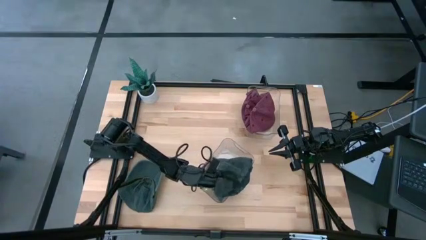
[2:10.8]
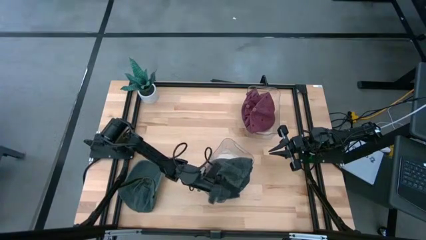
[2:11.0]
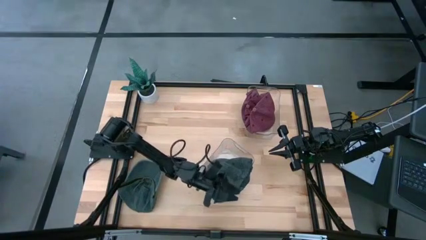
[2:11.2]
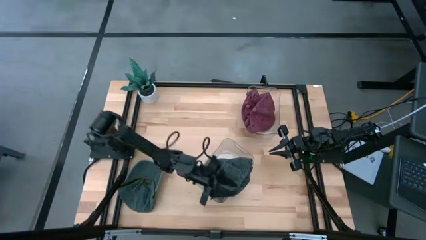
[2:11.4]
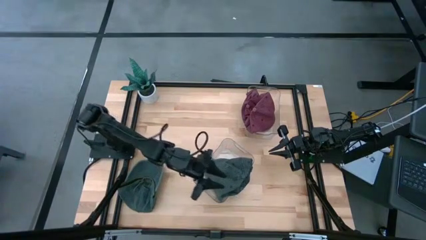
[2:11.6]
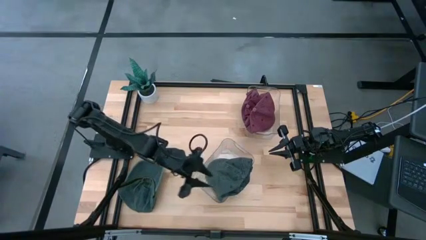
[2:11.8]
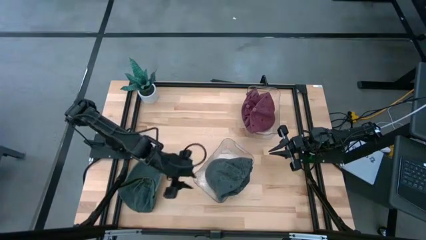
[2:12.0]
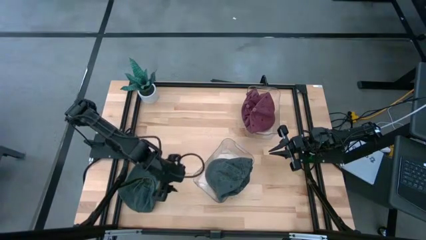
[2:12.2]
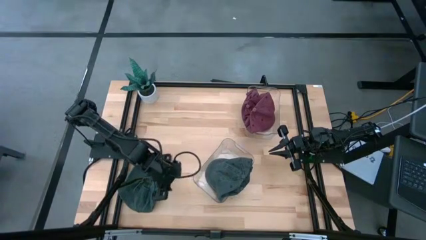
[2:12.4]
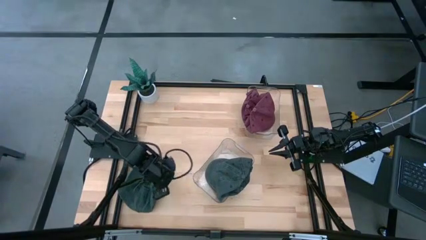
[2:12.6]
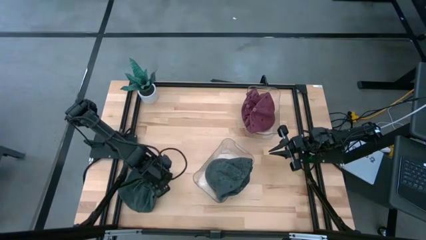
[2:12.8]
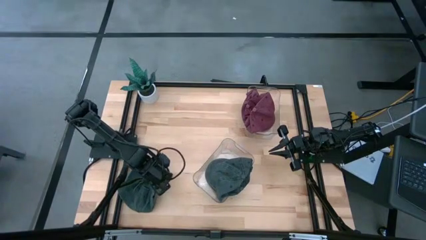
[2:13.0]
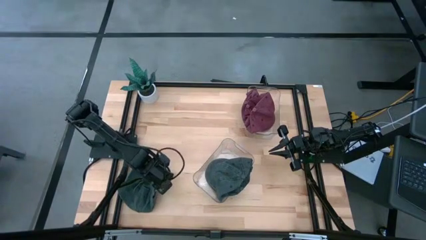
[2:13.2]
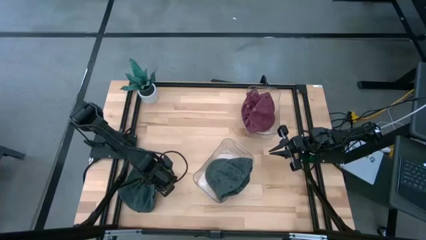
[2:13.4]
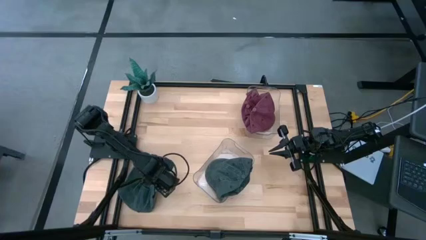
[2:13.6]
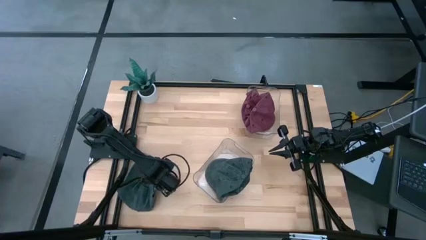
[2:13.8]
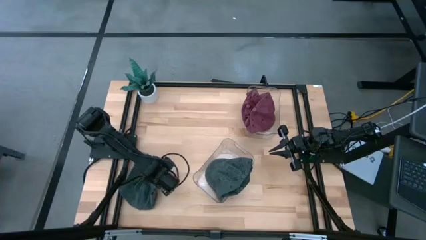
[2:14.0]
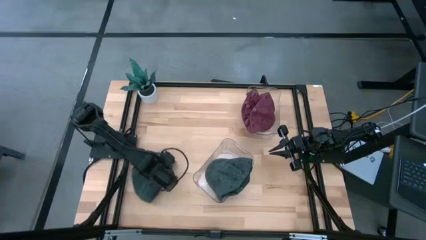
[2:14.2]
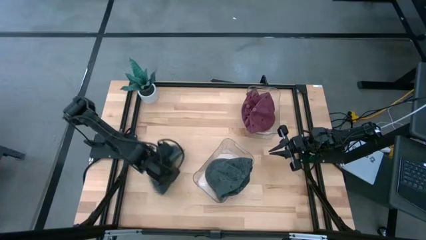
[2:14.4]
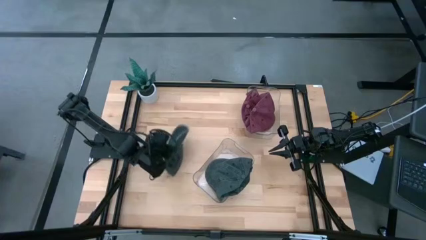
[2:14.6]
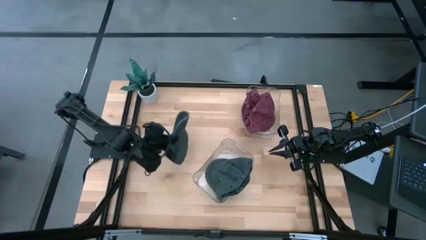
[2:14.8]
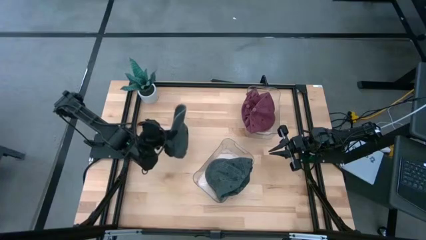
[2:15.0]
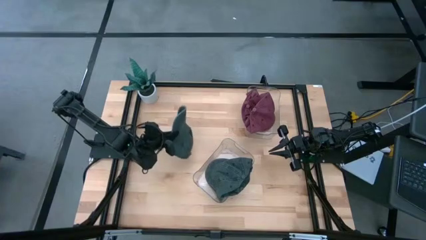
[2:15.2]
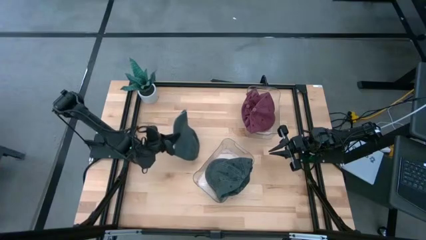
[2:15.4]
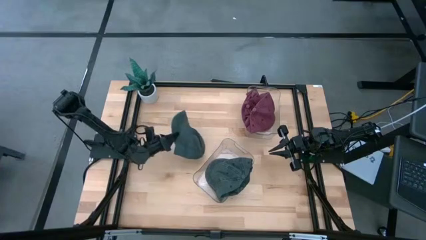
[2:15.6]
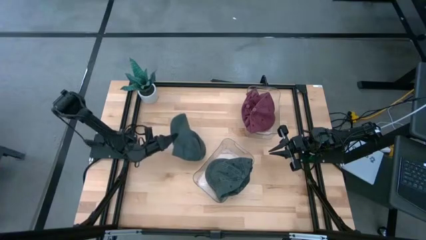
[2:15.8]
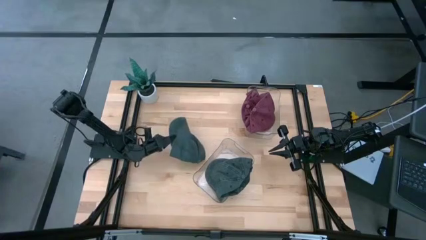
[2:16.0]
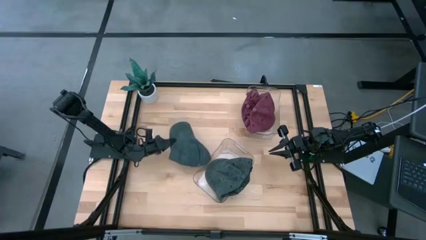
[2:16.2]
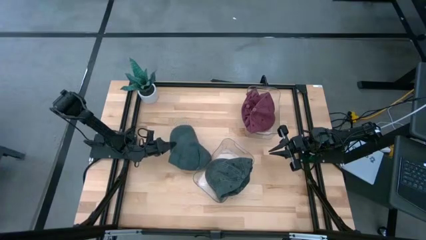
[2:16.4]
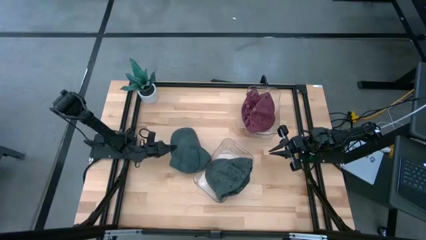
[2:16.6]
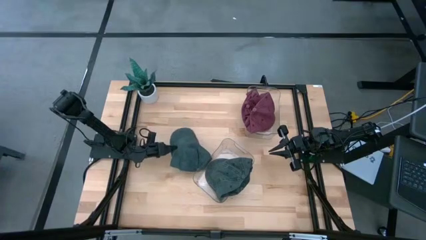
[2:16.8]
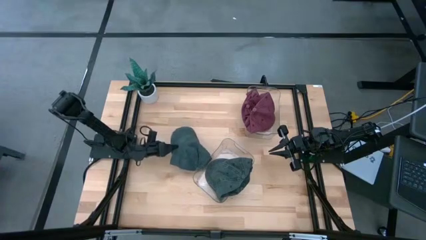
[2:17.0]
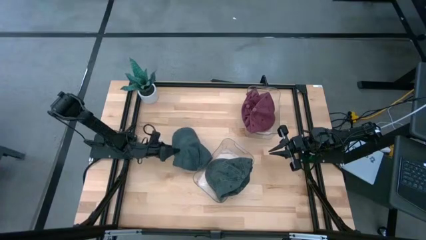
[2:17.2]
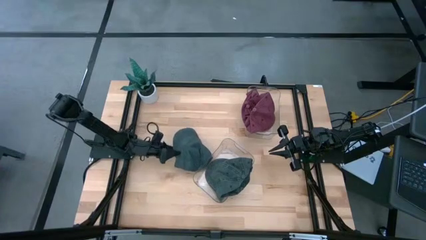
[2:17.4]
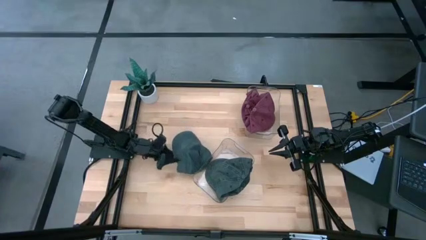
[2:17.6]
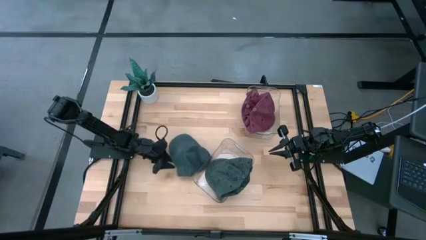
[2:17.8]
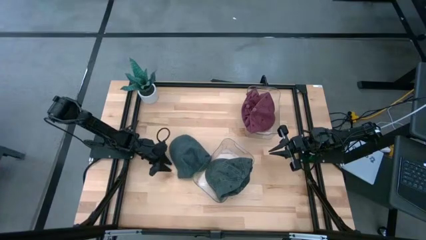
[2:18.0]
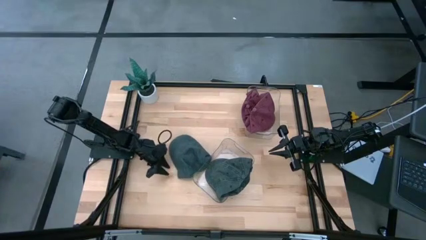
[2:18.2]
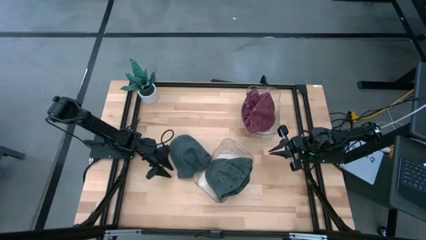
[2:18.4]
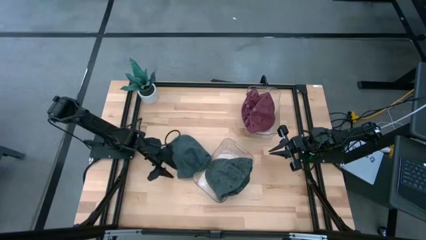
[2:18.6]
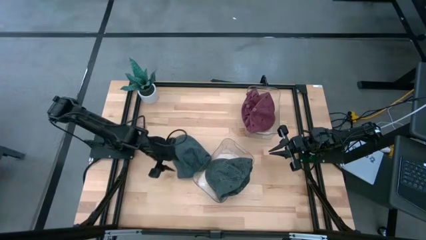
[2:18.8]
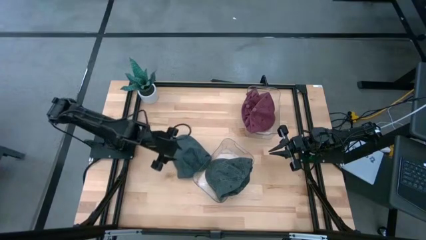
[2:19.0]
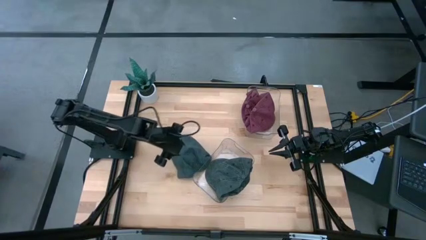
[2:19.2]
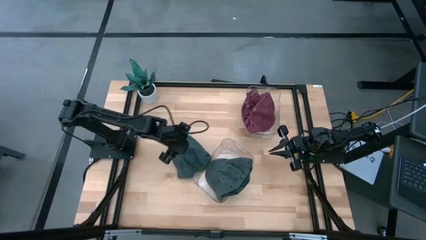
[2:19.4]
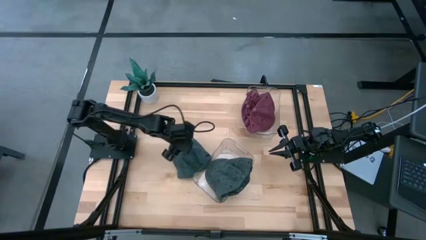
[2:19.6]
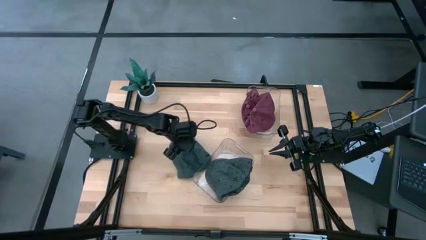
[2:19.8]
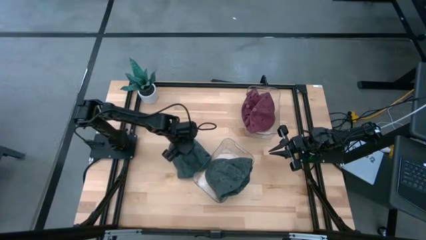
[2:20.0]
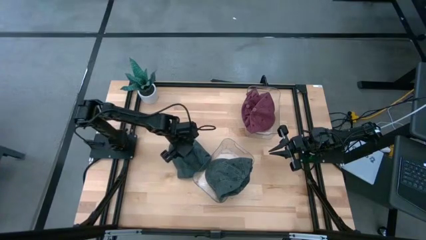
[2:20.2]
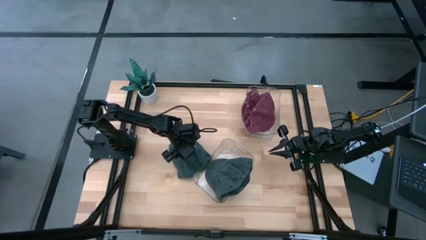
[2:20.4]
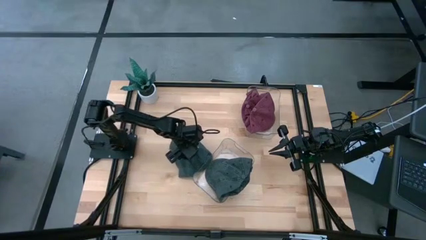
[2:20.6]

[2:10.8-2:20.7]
Task: Pick & Place hat
Put the black cap into the bottom transparent bin

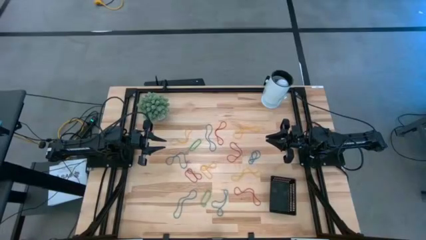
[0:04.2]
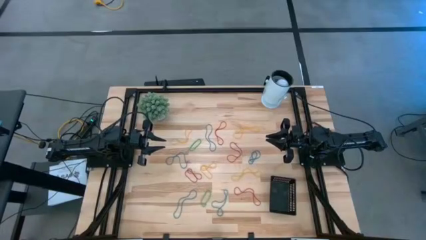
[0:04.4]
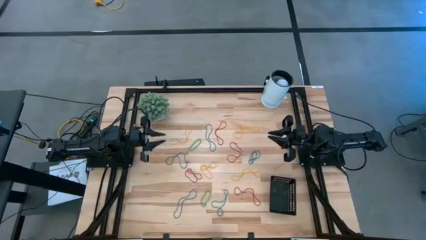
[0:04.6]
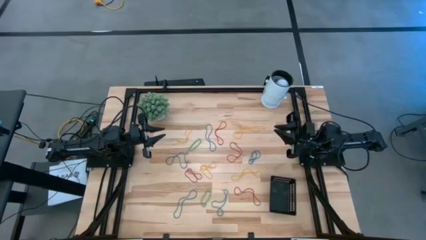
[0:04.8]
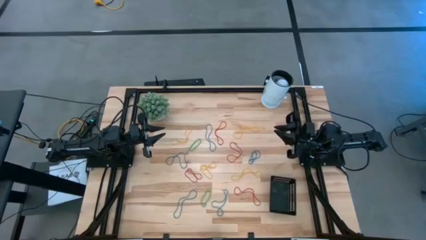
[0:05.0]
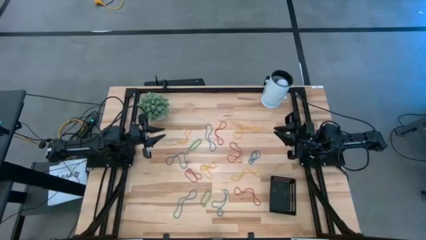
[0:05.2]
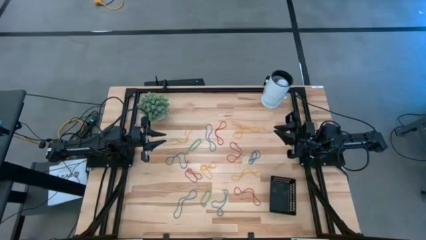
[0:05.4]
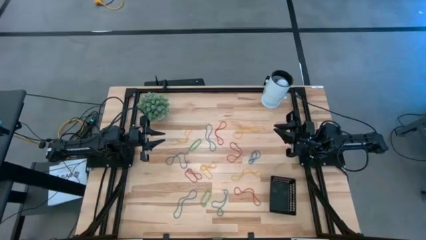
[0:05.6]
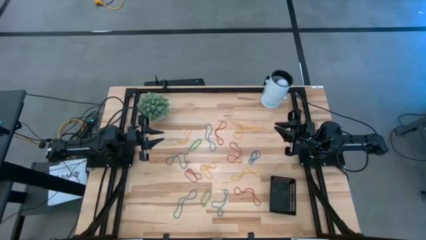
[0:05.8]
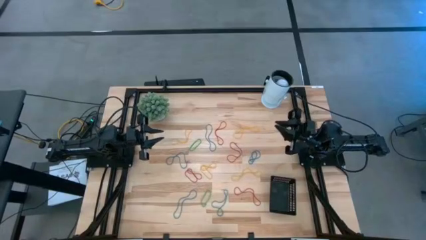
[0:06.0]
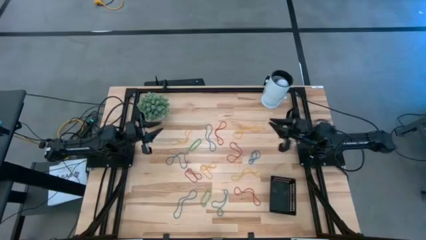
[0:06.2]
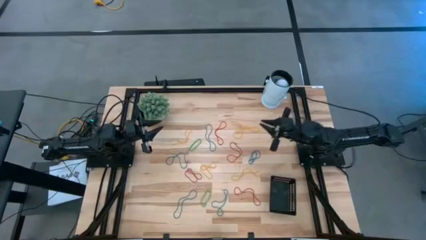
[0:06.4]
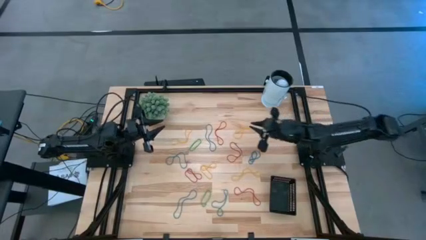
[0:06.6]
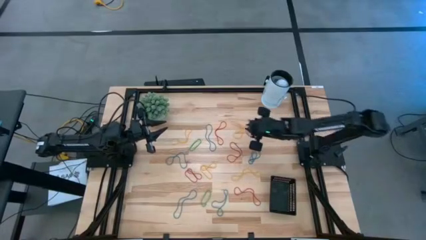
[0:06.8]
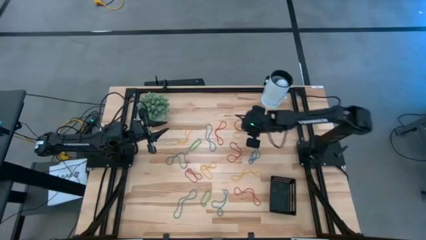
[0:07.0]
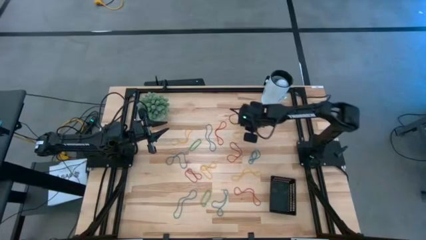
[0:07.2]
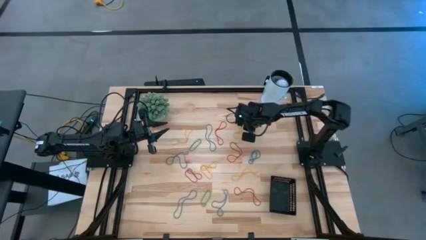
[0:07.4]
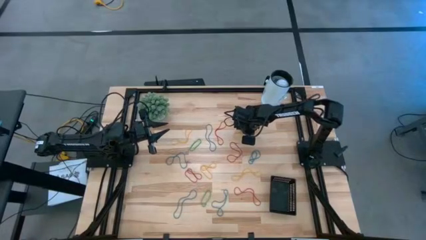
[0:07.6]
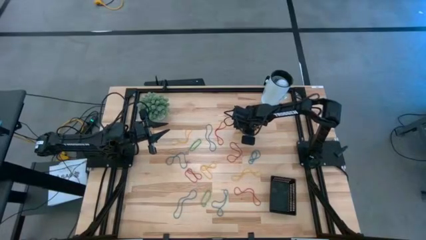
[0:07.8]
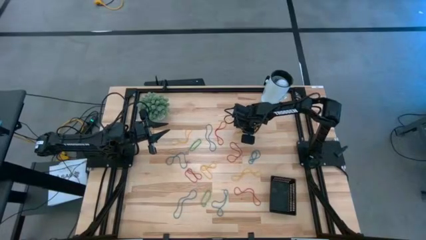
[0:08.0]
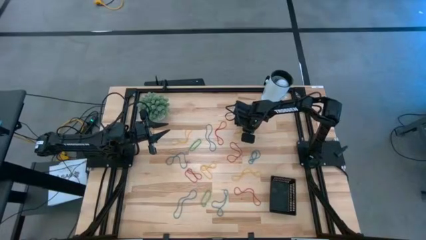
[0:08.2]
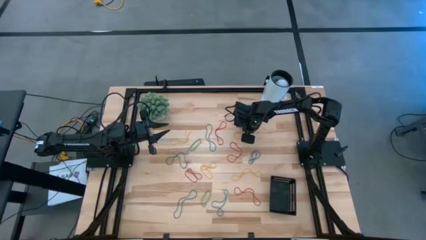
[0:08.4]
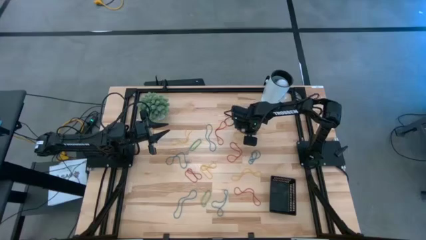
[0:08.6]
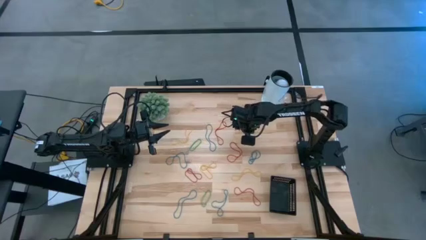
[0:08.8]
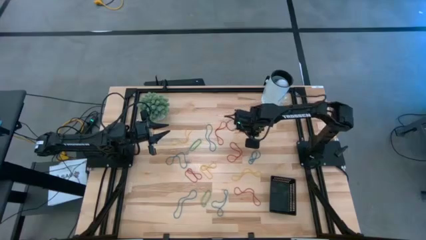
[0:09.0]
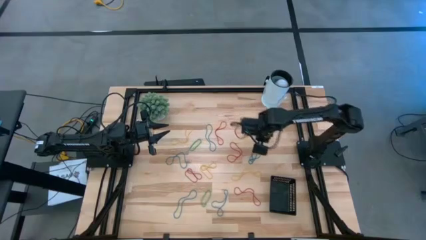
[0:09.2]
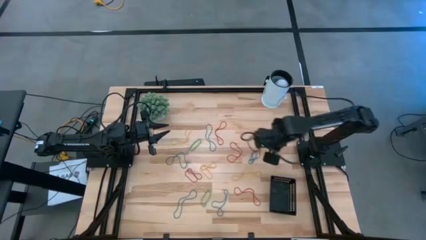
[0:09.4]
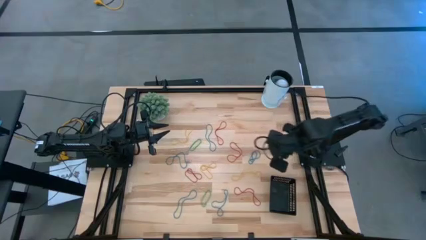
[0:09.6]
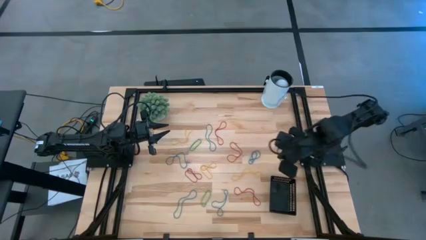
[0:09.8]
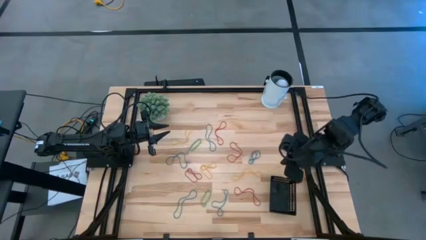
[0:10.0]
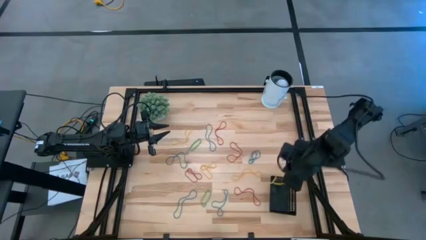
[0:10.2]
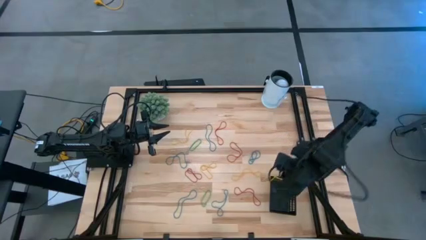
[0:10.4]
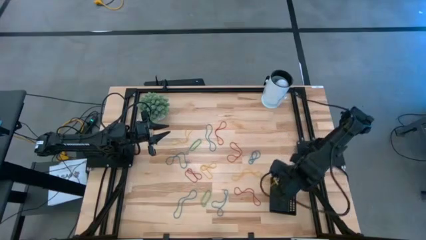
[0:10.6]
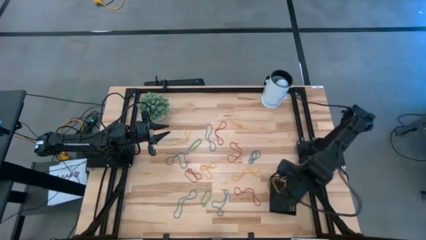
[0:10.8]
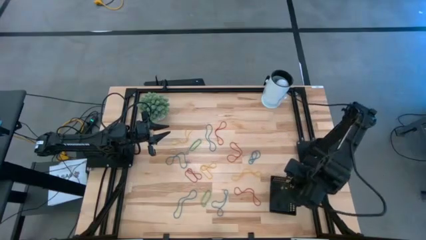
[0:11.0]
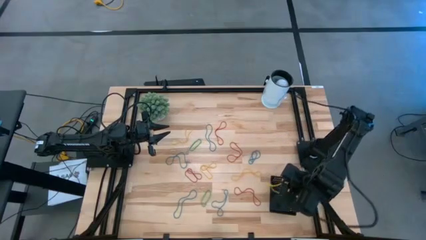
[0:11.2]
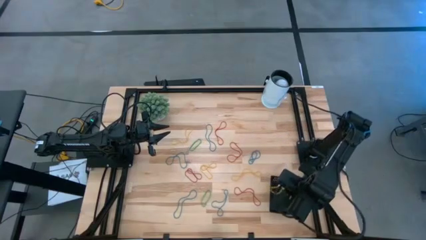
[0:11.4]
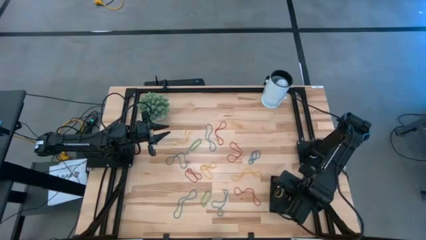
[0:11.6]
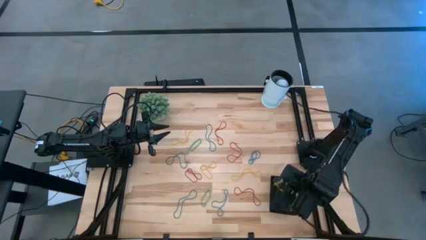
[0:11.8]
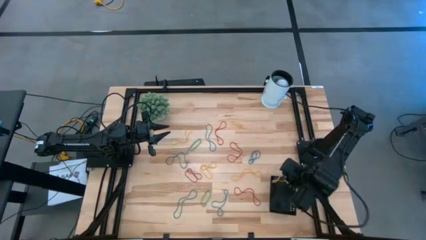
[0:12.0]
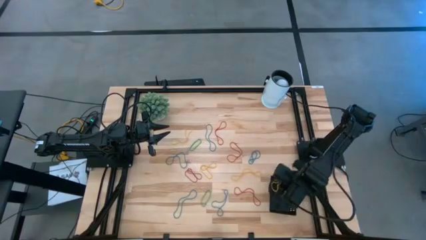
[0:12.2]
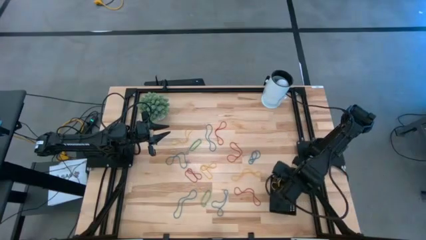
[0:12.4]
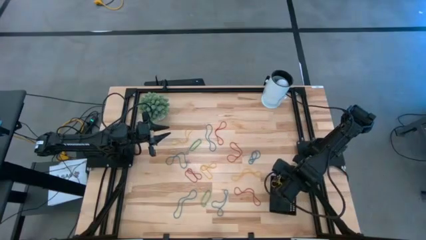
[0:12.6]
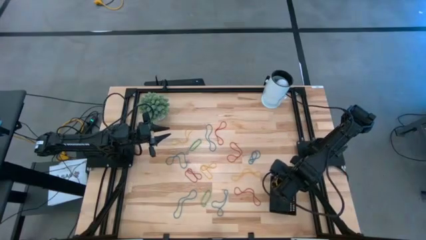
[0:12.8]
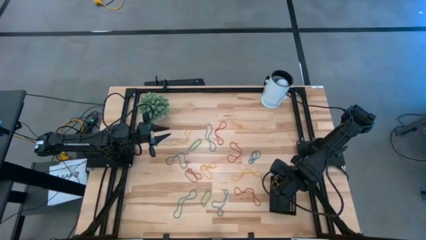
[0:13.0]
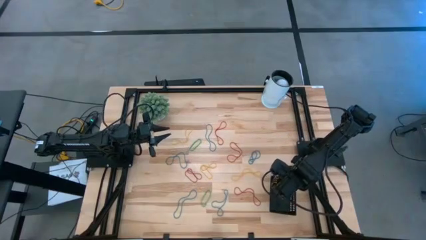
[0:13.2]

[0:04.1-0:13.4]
Task: Pick and place items into bin
Put the top right yellow rubberband into the black basket
